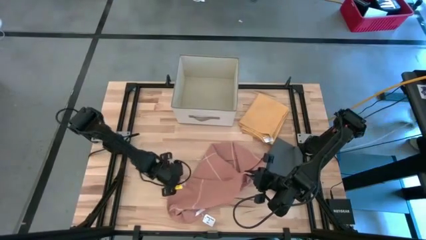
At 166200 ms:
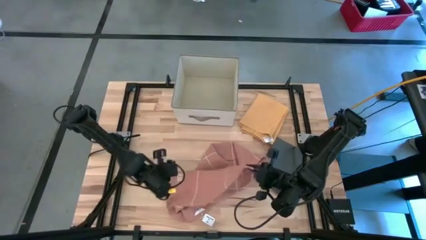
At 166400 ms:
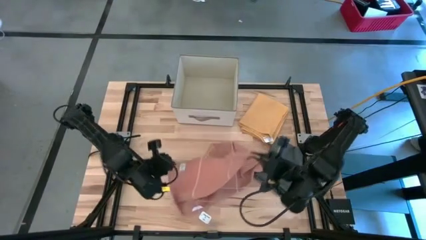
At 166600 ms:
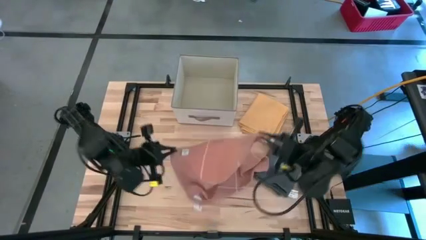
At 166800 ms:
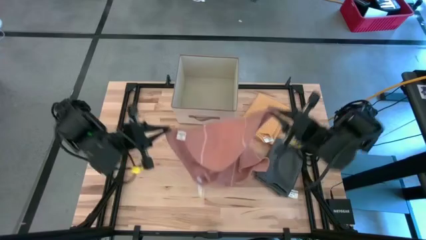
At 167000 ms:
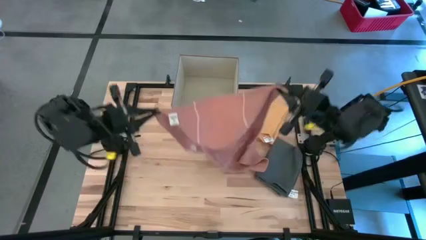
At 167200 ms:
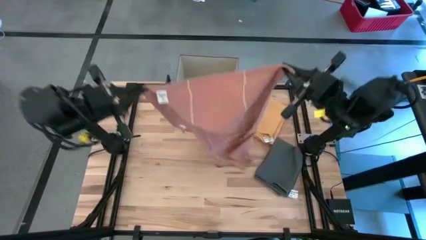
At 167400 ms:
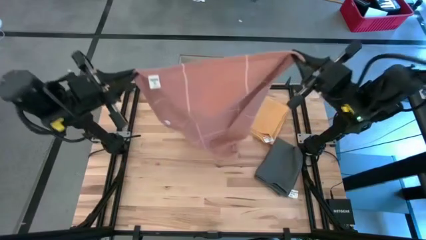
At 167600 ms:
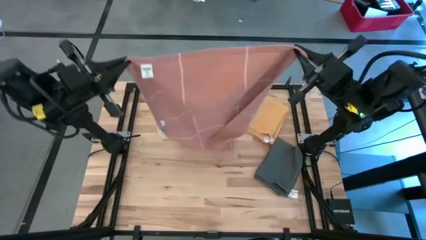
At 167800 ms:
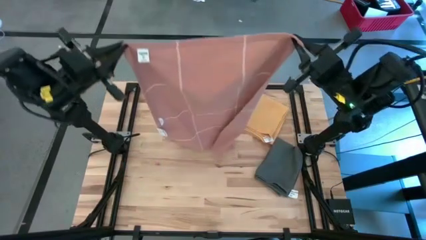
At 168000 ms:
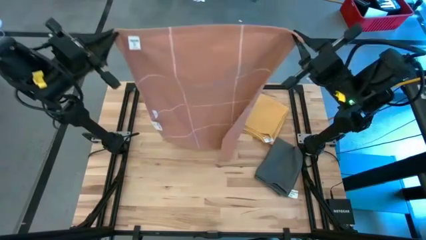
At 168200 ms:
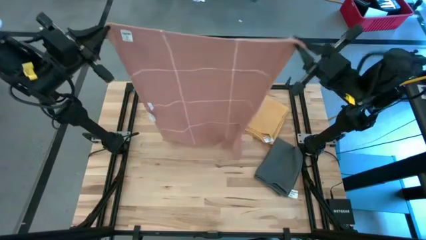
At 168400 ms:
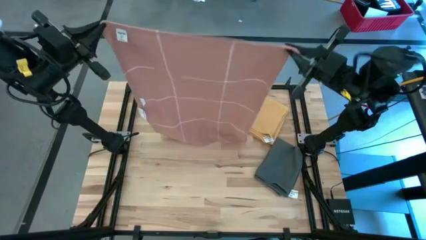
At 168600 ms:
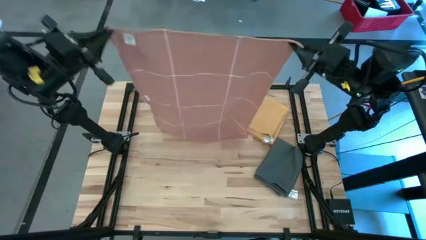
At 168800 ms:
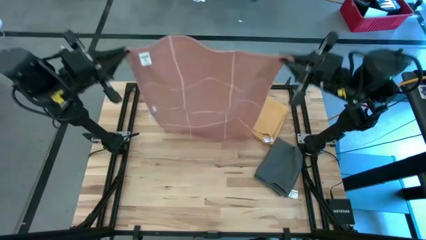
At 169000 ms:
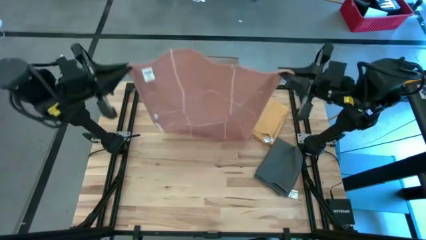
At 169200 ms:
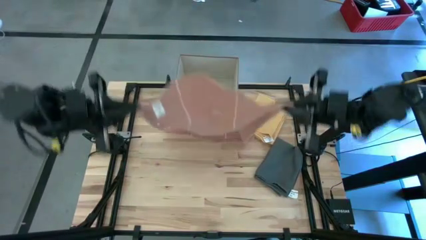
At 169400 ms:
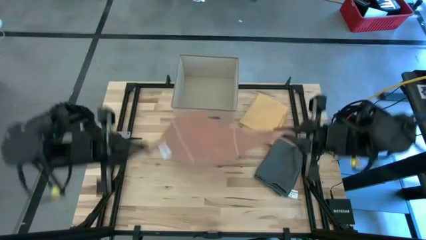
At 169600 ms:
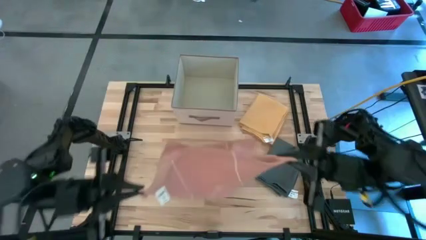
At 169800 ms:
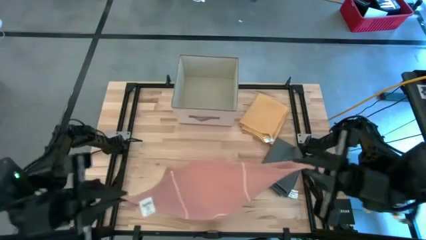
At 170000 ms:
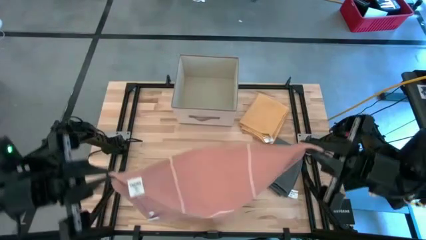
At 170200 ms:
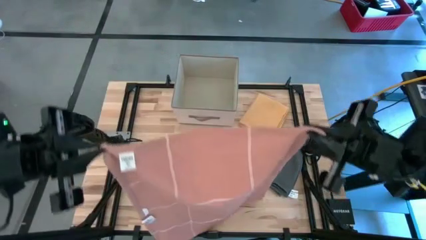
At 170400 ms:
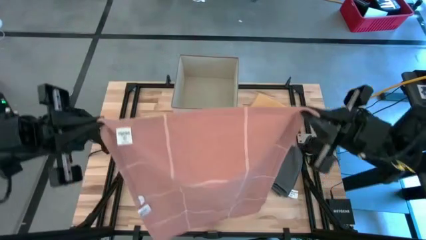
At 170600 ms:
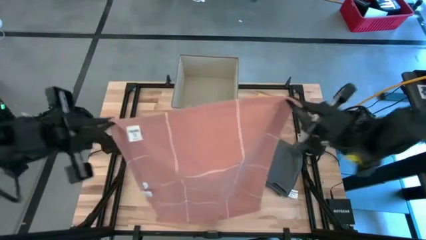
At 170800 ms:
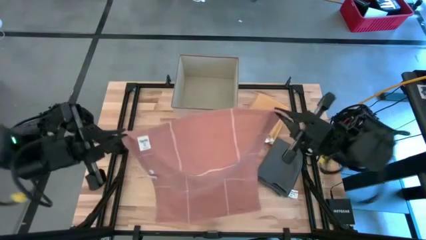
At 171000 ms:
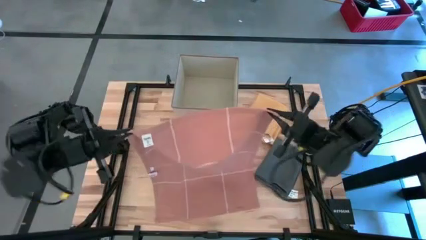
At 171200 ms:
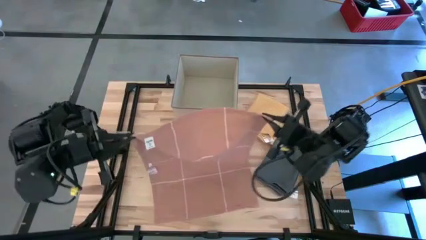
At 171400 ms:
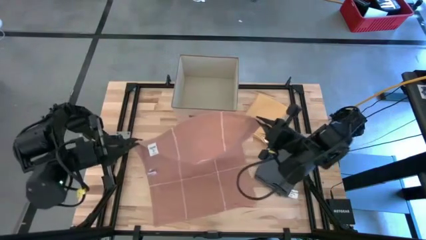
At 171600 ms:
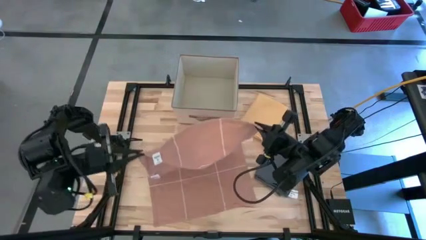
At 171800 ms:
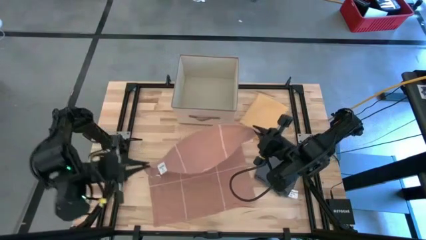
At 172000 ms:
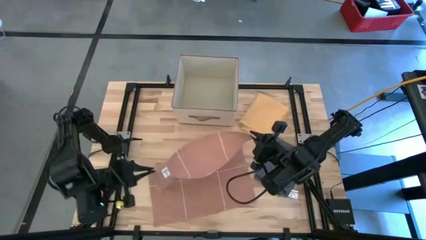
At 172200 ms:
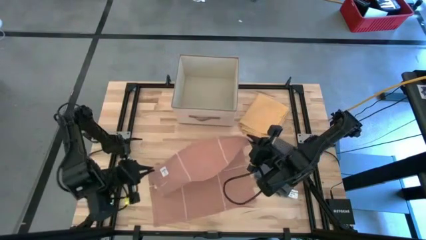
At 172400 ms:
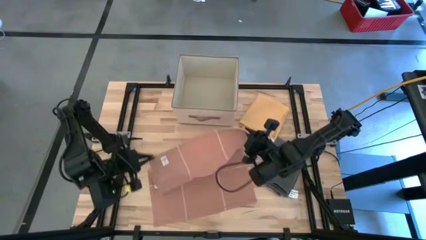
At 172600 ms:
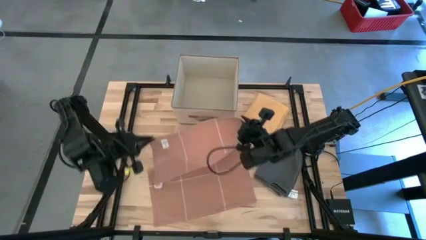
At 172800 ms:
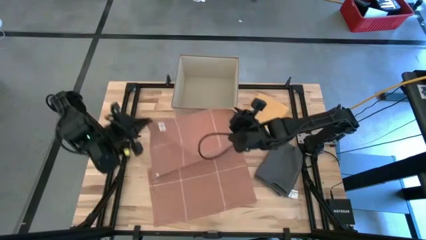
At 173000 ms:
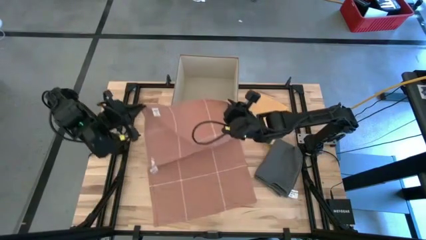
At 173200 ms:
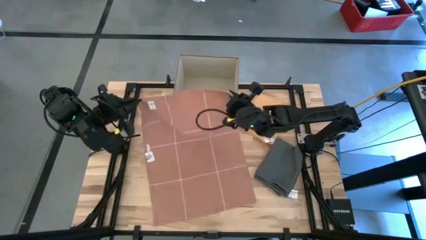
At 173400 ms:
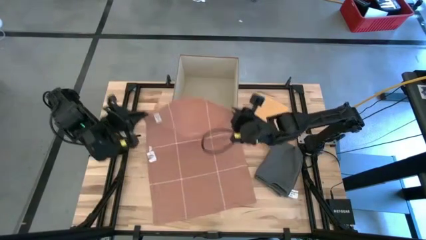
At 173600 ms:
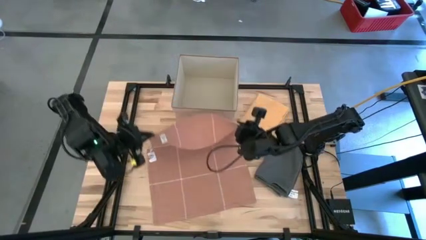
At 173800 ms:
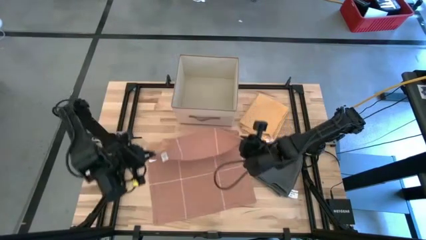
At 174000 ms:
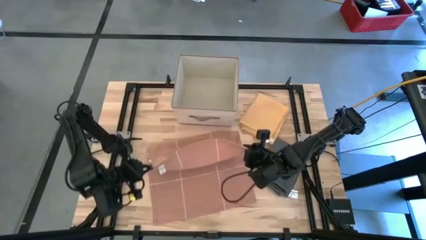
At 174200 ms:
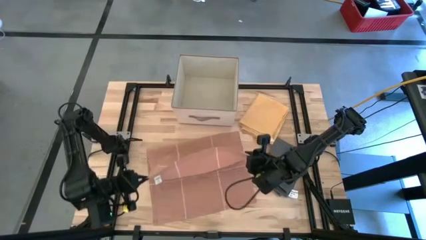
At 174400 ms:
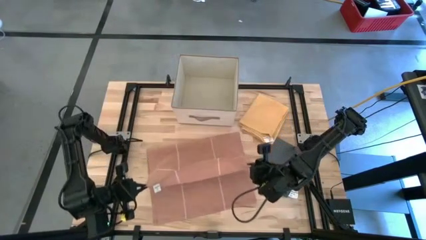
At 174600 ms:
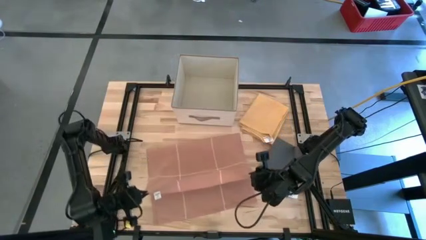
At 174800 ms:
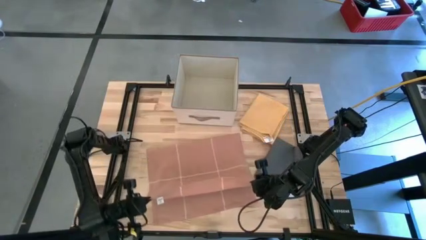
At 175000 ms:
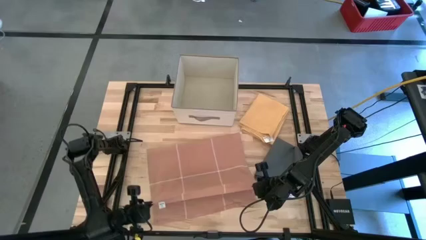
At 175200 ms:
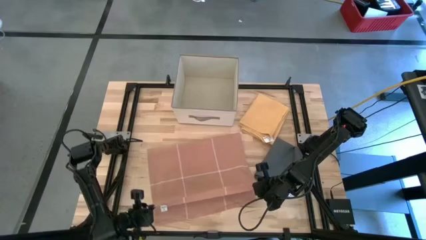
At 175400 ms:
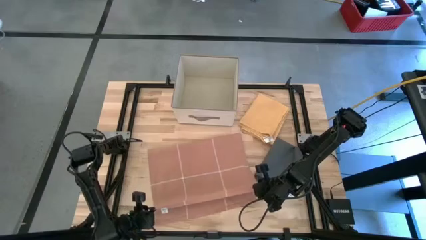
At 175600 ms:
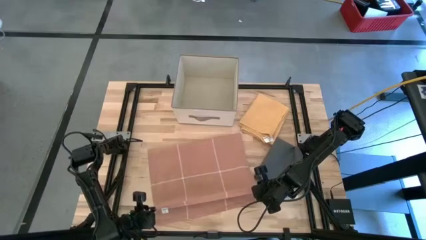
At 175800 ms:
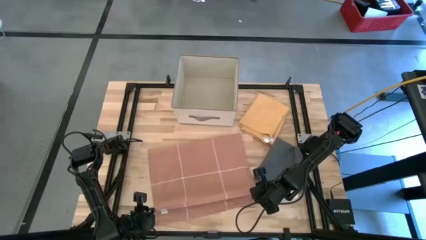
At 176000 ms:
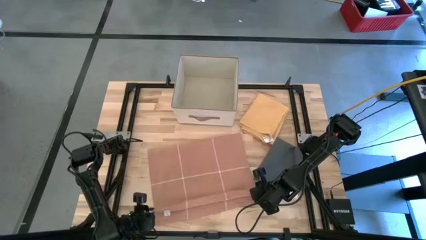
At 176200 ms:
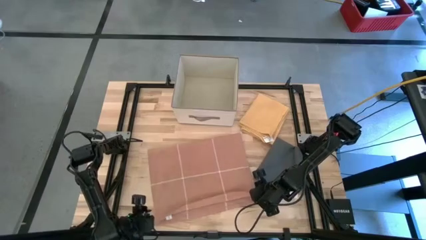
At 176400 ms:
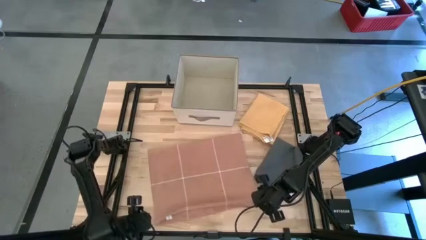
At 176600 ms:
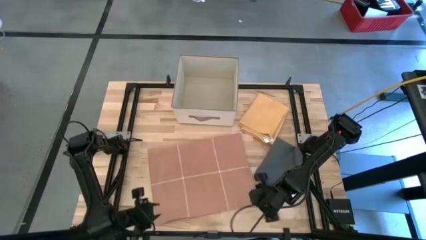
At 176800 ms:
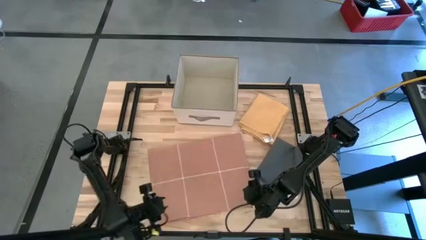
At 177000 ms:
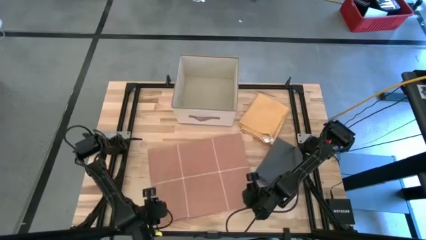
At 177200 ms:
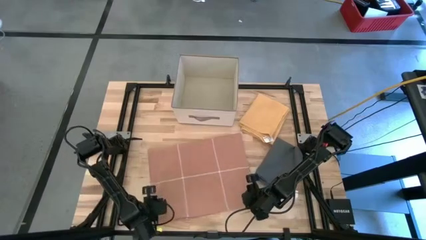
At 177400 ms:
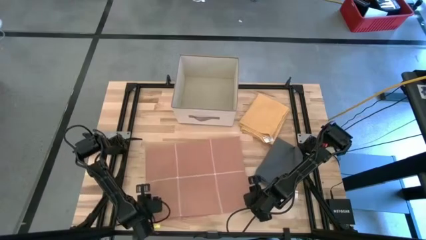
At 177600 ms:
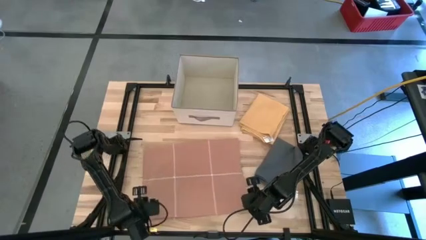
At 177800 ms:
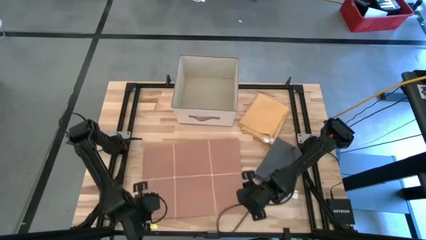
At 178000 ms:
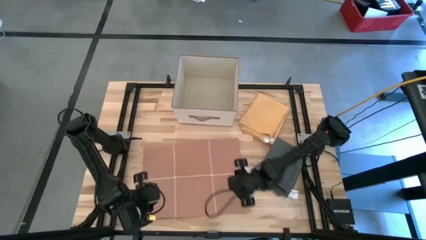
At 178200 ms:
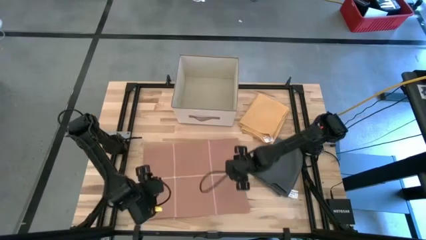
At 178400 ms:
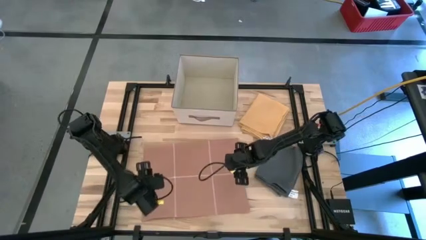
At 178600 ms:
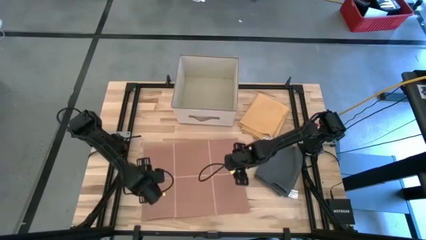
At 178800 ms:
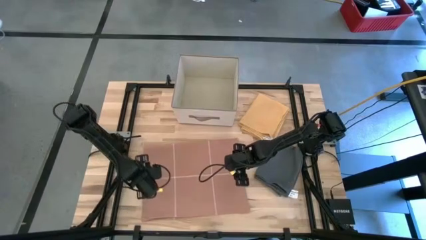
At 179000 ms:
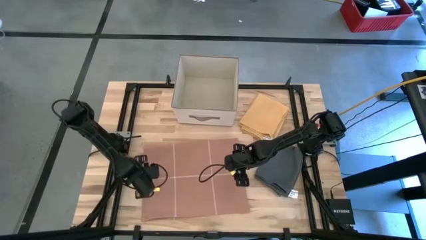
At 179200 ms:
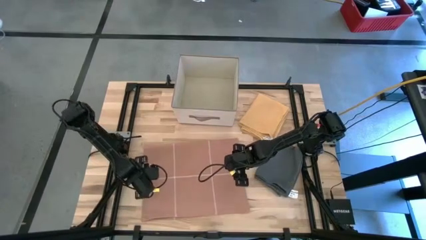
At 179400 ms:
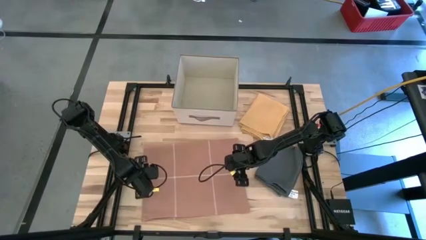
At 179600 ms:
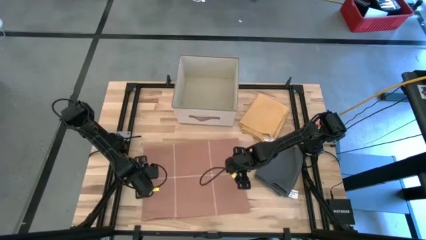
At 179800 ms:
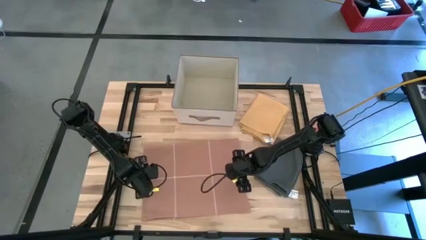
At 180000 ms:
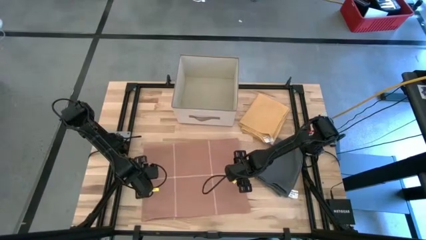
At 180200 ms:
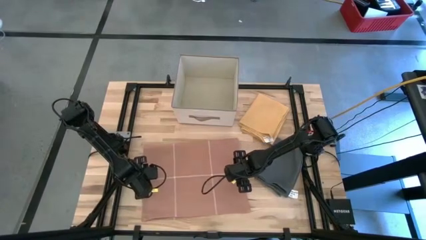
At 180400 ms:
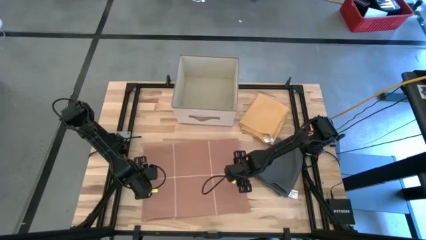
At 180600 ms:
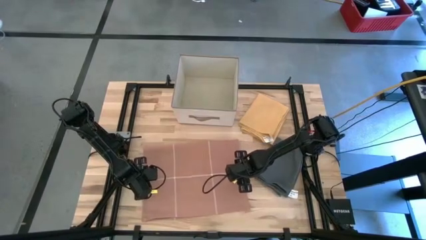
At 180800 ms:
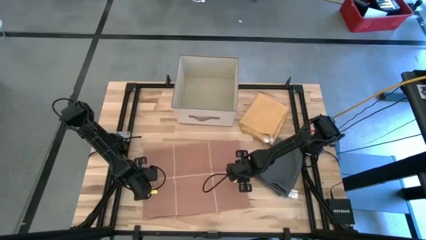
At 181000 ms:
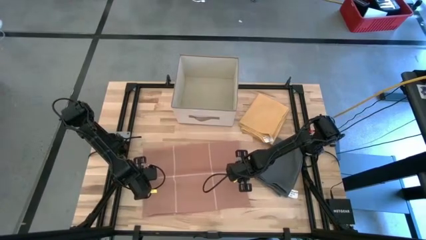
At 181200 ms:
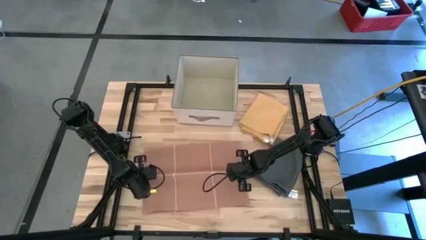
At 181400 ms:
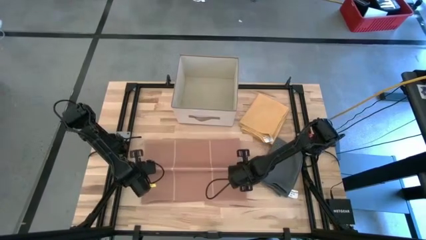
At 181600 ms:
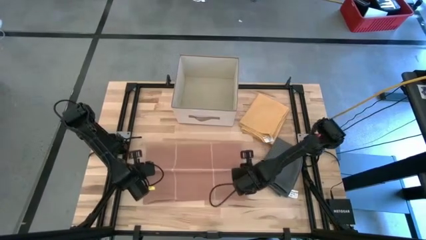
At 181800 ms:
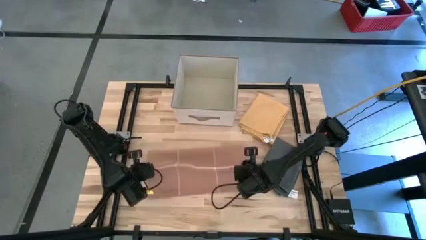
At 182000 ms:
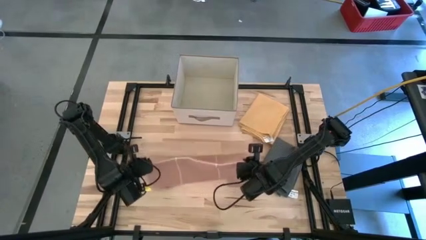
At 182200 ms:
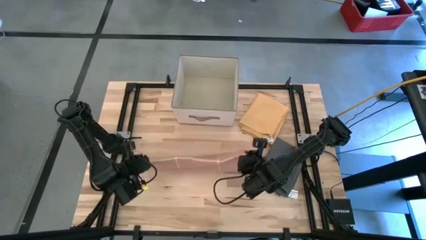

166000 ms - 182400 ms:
Task: Fold towel
Fold the brown towel
